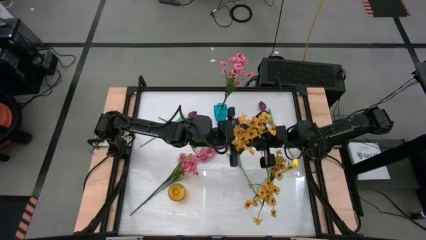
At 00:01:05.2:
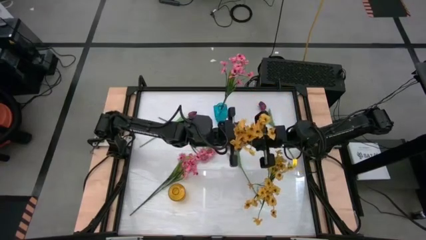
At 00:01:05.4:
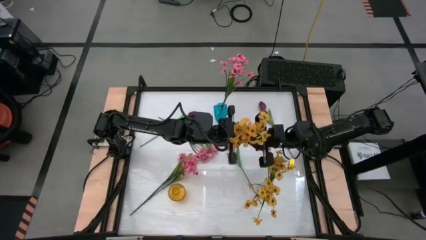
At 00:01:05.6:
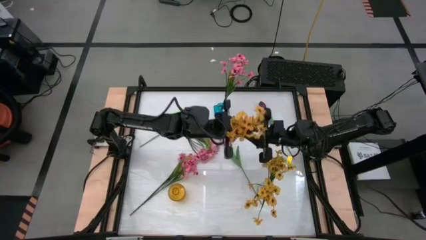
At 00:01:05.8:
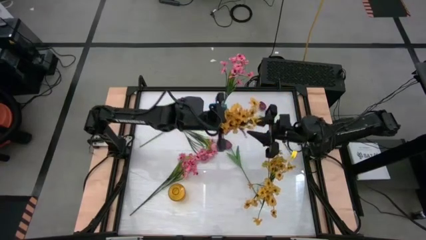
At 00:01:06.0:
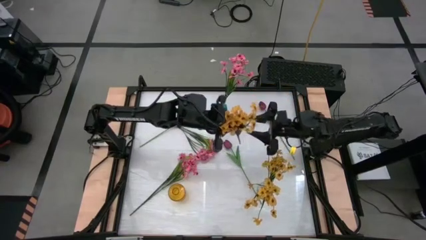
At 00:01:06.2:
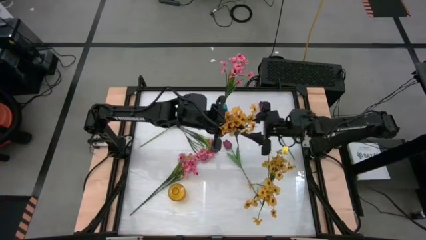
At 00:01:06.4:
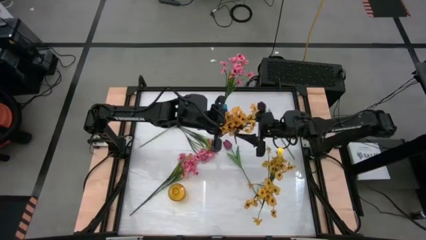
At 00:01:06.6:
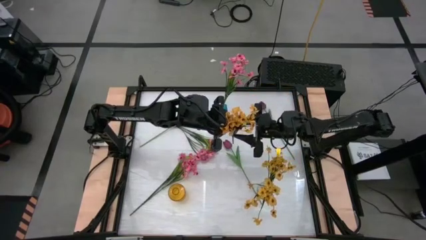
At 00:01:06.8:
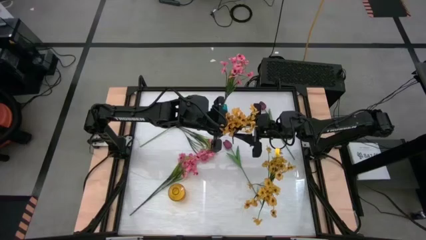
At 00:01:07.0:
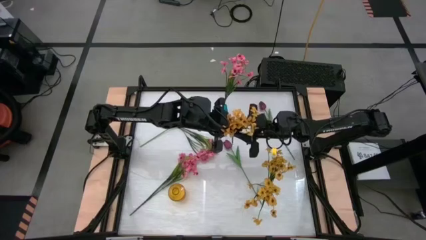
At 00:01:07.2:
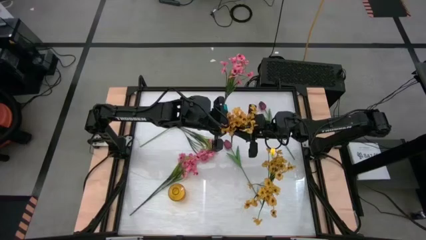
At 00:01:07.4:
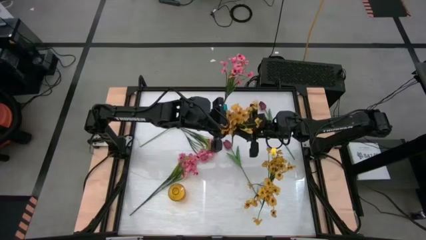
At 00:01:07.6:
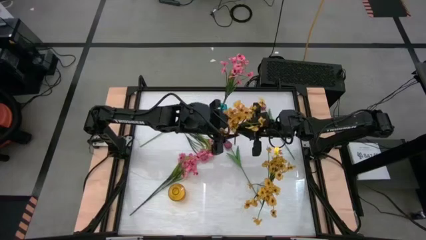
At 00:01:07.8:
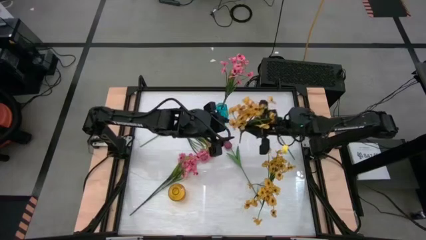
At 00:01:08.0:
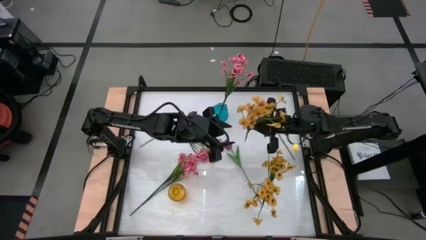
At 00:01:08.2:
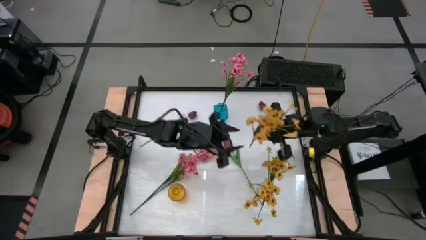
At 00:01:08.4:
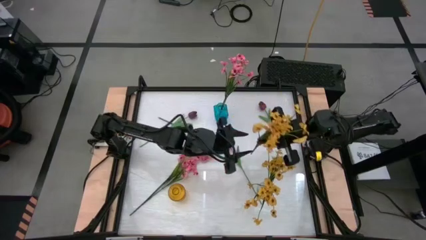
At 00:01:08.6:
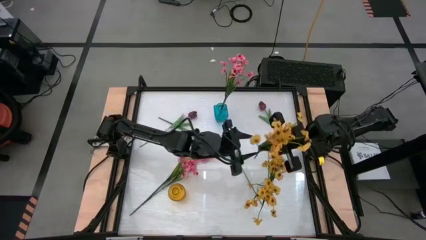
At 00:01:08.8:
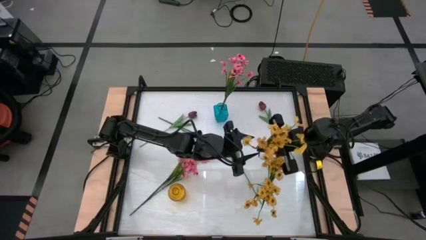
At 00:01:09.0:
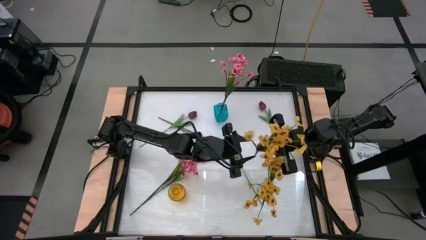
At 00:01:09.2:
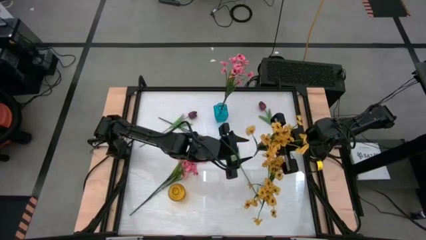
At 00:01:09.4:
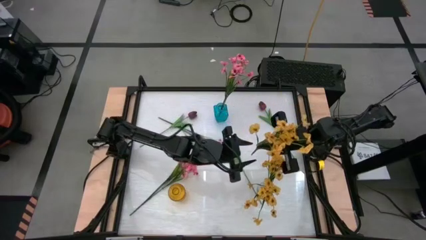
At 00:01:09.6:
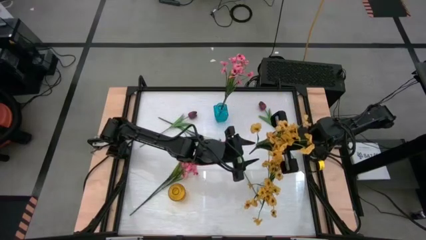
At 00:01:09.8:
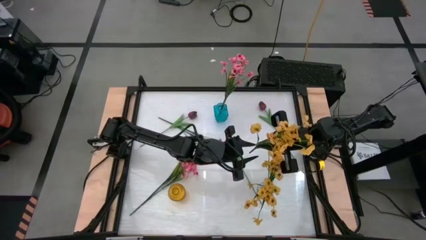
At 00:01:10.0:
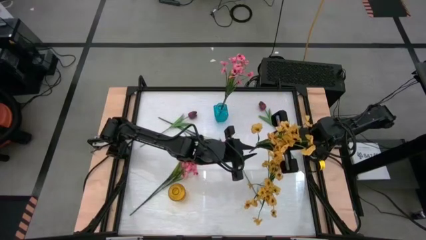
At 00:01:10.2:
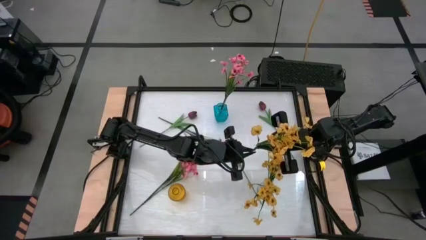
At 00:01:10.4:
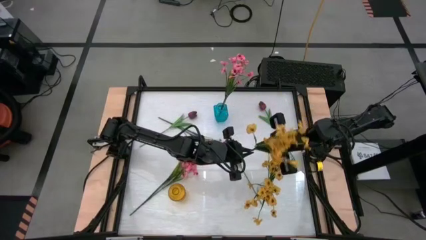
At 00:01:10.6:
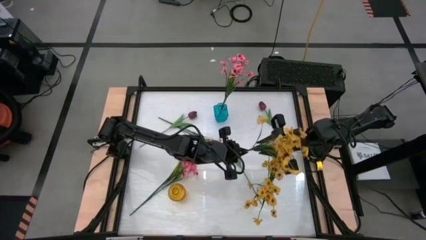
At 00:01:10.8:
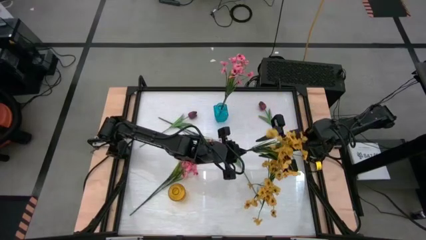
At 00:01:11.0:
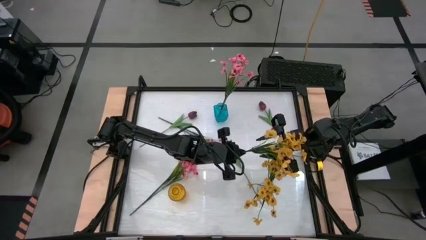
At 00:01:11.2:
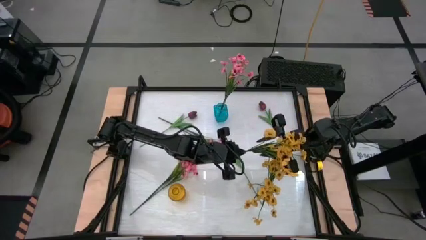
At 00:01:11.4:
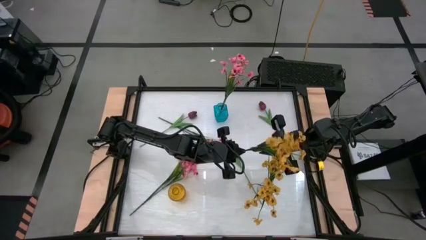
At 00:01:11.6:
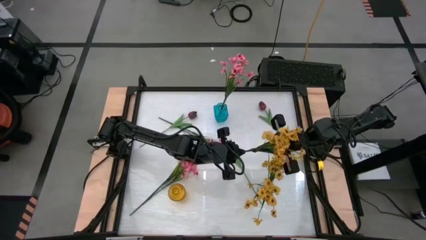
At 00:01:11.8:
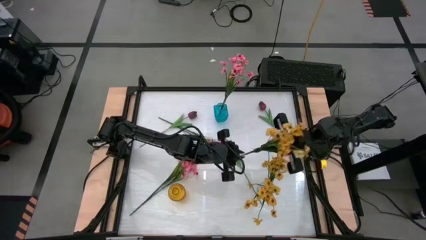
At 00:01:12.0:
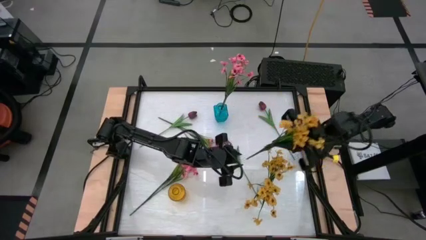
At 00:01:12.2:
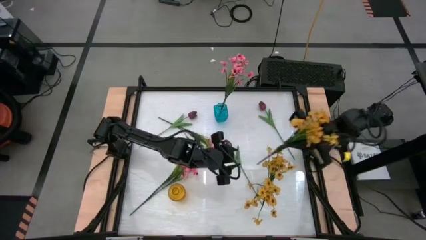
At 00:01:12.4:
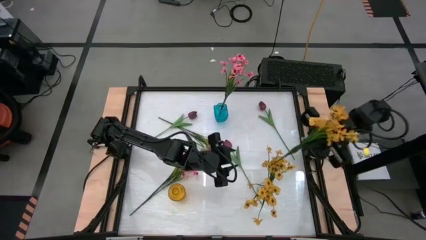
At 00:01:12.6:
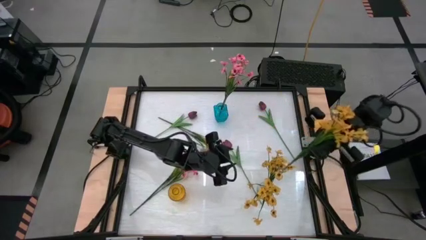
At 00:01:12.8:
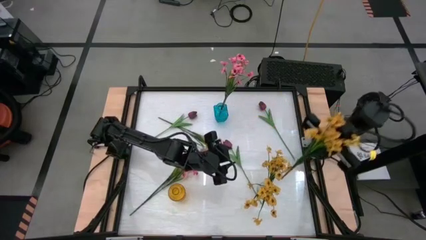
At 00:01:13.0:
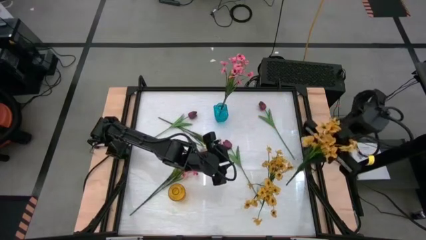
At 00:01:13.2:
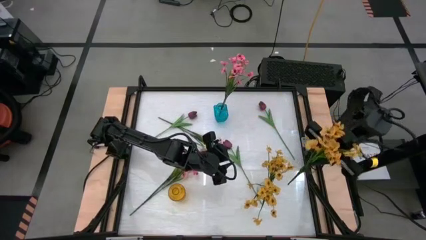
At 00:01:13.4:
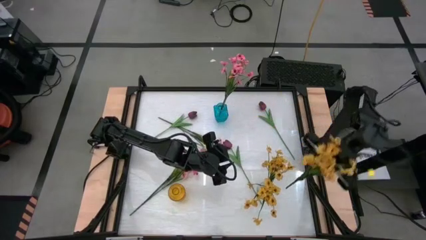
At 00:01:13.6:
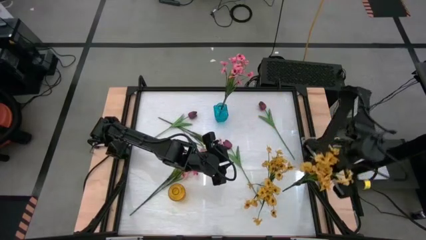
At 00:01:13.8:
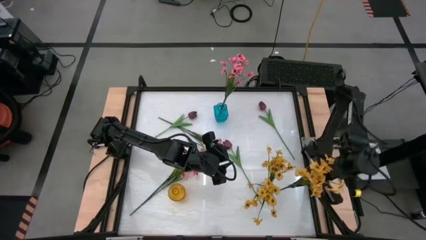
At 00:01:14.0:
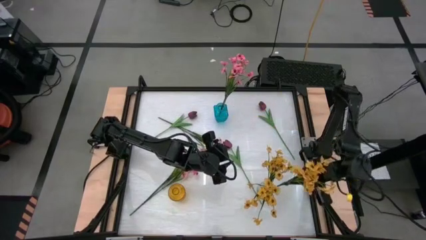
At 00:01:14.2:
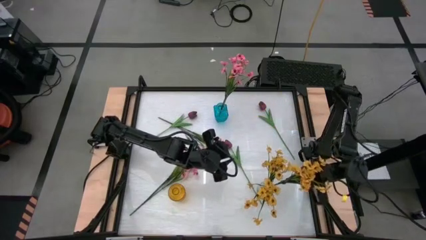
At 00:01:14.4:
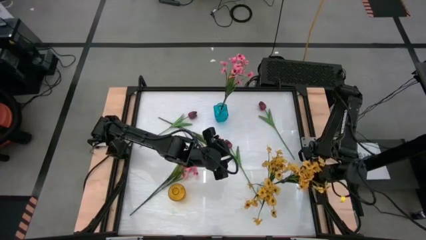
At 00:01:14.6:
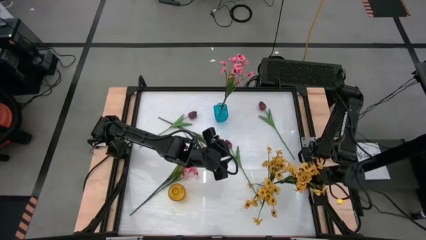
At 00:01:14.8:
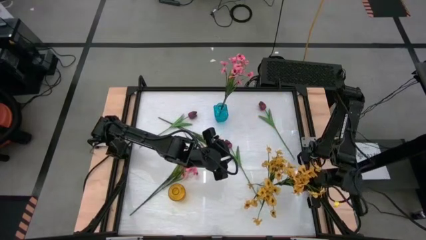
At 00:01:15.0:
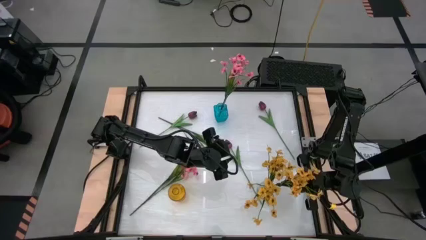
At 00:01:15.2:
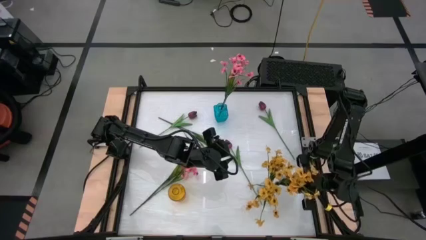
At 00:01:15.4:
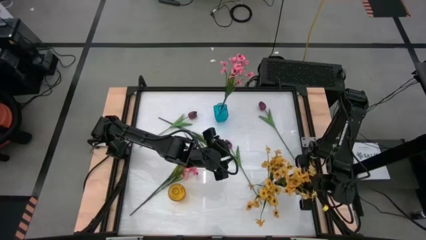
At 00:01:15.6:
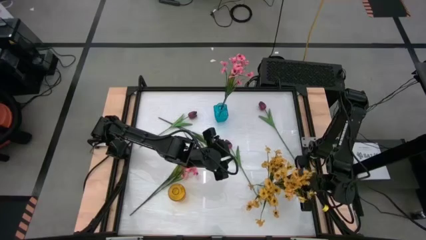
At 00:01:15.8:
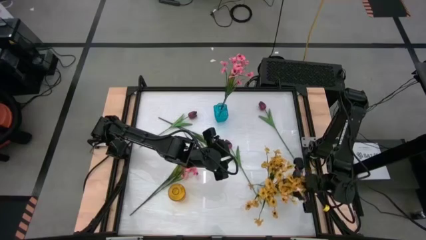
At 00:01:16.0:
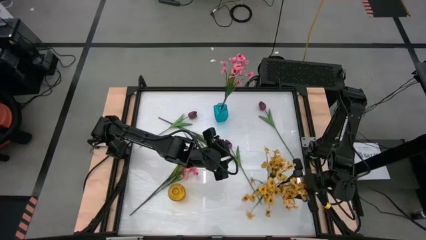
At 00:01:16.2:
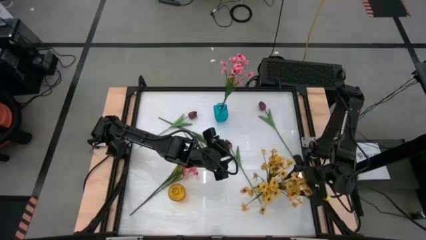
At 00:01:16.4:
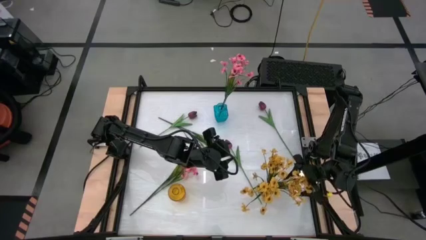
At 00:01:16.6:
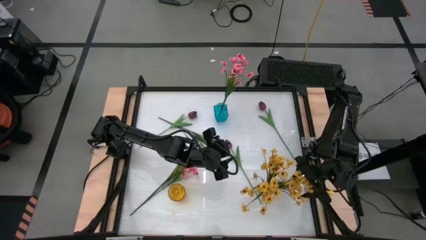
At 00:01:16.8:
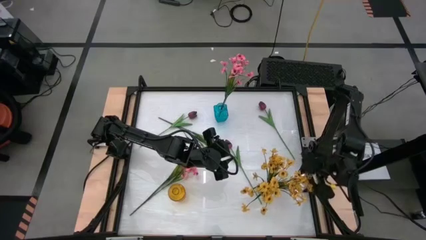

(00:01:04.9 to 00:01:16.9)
Task: Sort flowers into vase by color
Put the yellow flowers into the transparent vase

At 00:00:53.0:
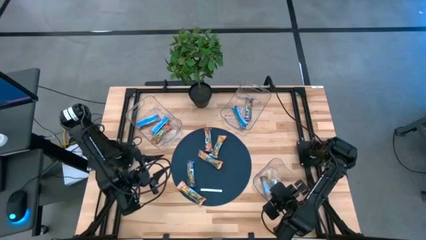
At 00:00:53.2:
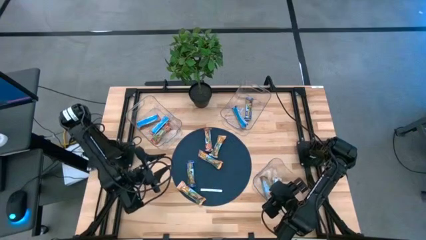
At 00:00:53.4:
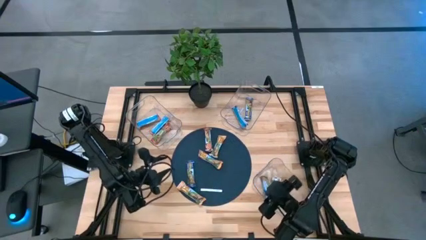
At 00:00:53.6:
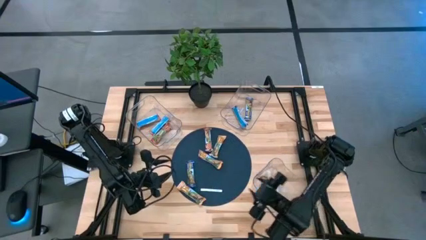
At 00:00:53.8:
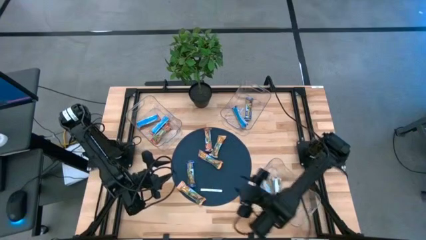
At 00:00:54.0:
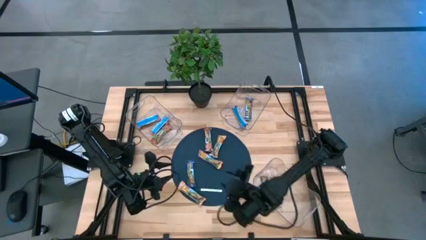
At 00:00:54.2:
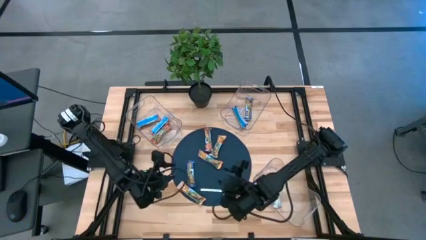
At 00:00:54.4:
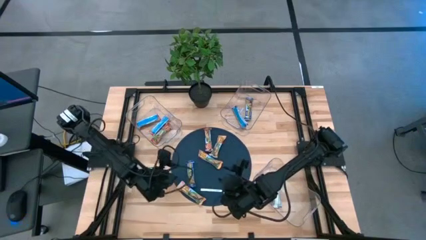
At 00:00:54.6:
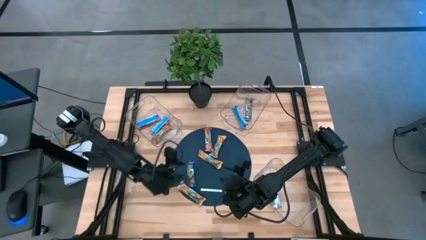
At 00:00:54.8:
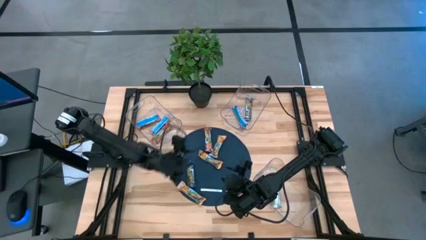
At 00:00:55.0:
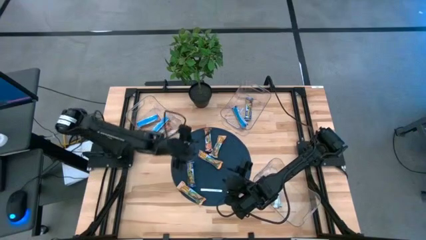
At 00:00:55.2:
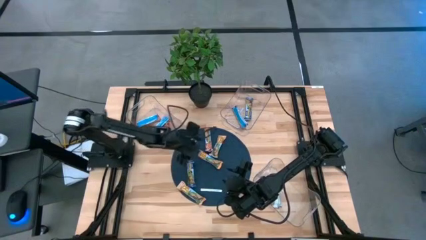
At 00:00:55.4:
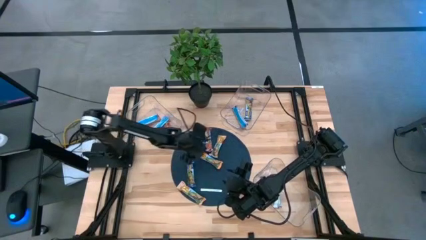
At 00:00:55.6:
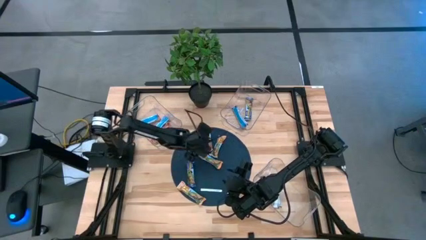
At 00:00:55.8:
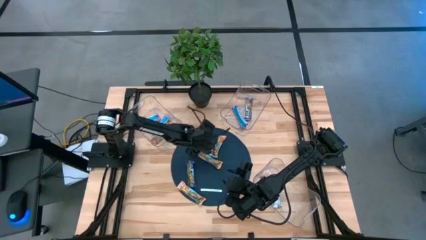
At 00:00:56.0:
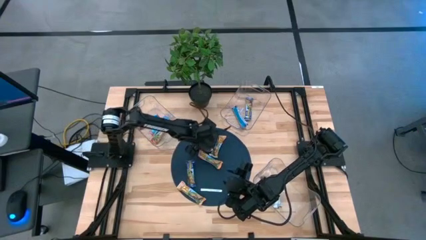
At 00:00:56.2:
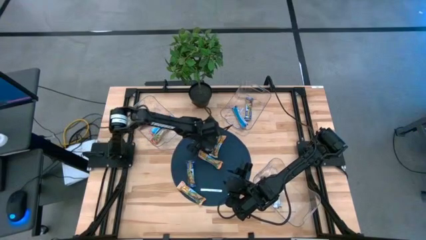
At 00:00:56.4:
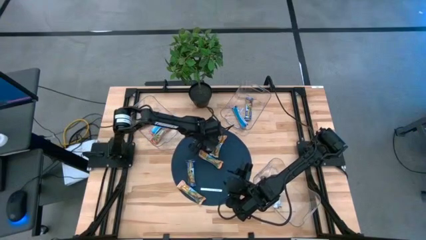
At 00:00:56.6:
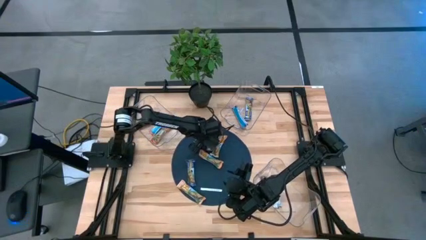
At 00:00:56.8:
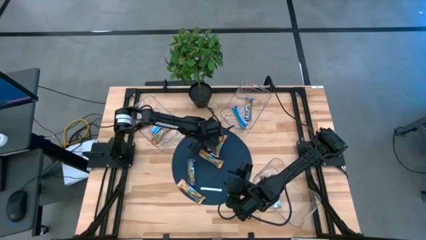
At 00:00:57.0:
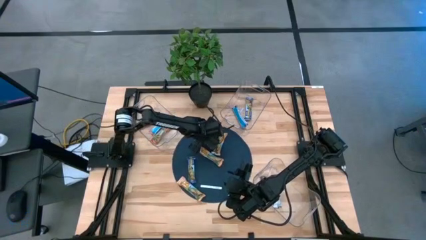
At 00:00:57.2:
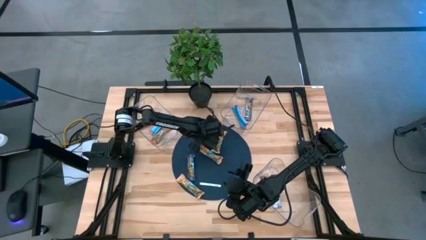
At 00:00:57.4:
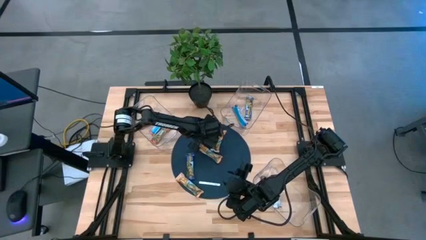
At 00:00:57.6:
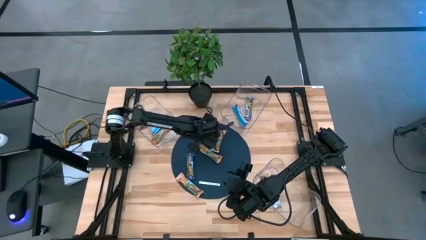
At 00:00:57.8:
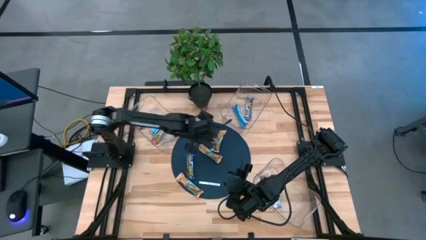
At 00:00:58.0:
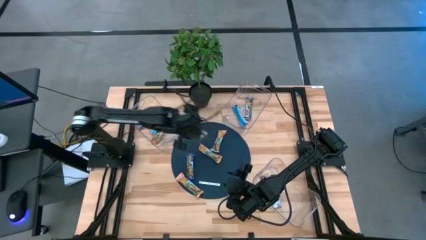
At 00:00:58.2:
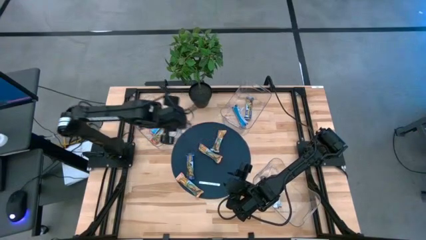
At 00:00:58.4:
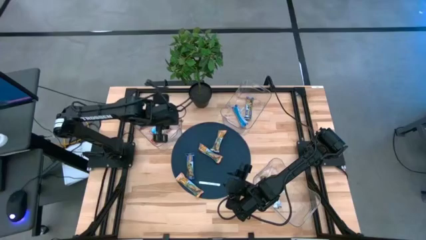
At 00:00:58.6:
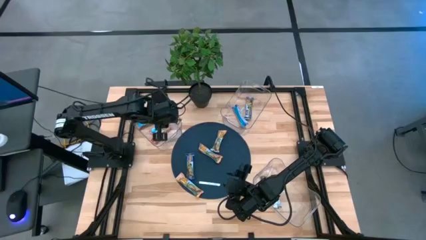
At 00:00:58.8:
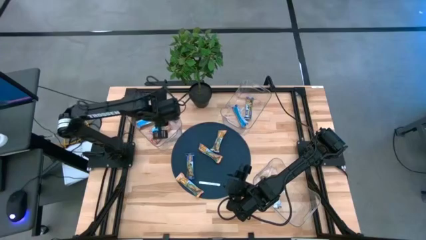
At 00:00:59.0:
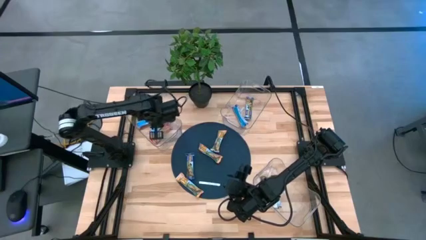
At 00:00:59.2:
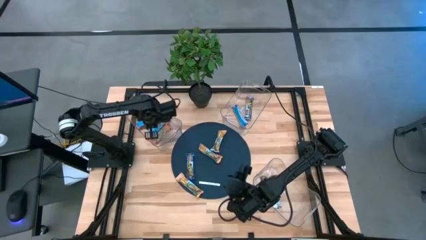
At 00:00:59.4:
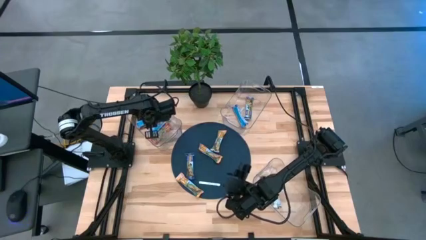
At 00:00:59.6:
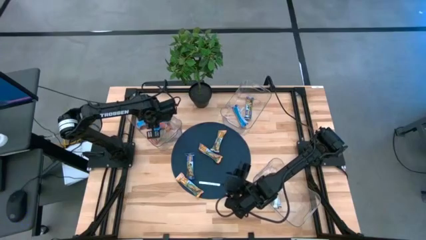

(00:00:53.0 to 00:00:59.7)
Task: Pick and place Granola Bars by type
Put the red granola bar into the top left transparent bin
